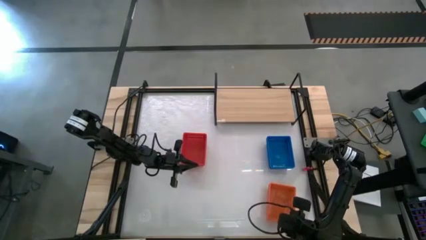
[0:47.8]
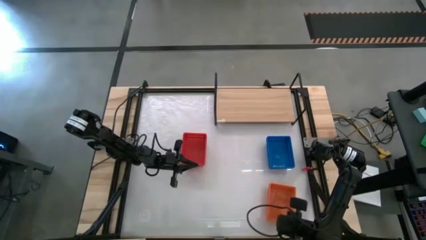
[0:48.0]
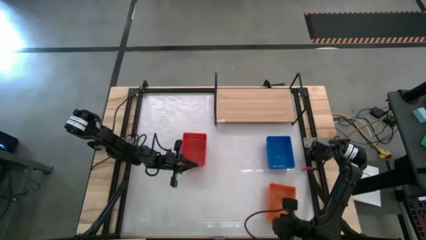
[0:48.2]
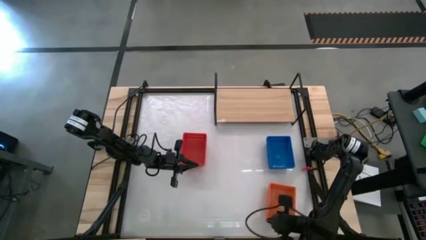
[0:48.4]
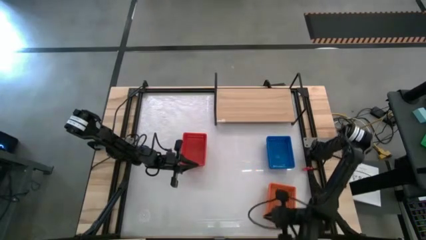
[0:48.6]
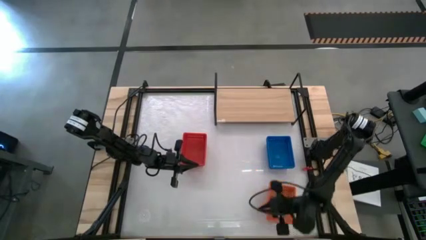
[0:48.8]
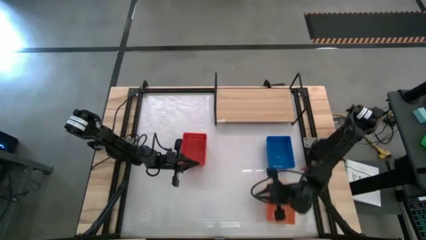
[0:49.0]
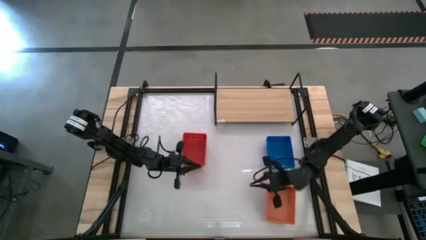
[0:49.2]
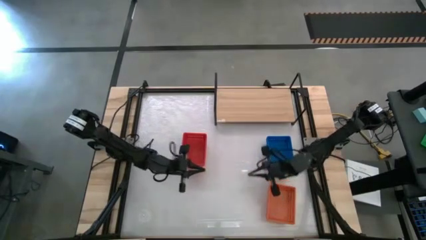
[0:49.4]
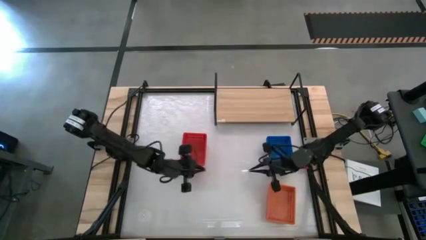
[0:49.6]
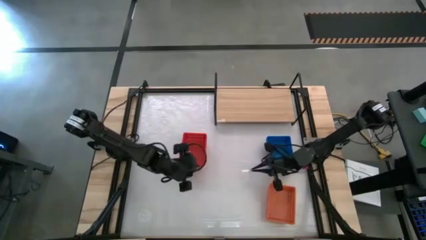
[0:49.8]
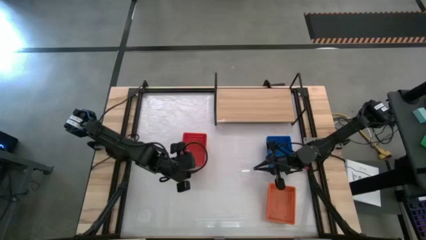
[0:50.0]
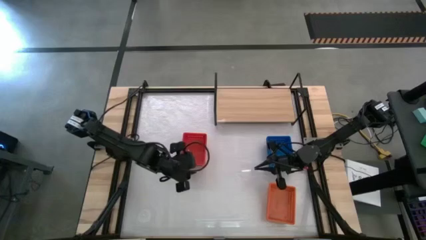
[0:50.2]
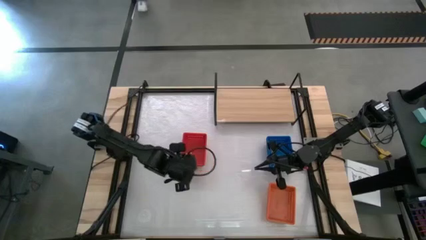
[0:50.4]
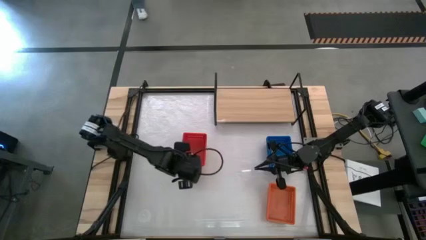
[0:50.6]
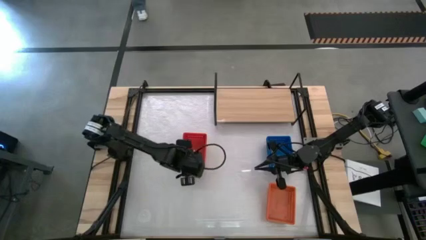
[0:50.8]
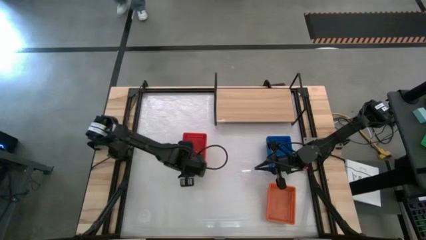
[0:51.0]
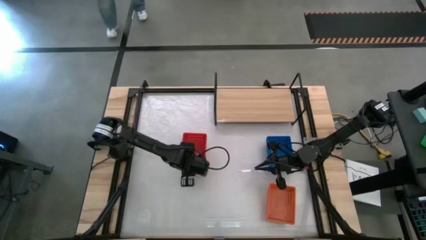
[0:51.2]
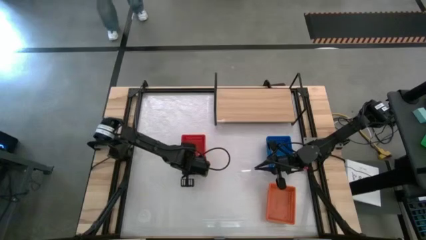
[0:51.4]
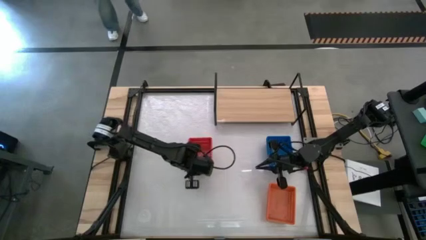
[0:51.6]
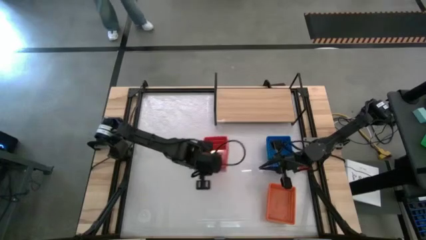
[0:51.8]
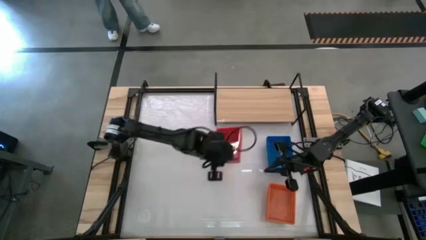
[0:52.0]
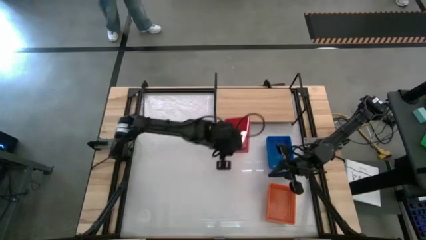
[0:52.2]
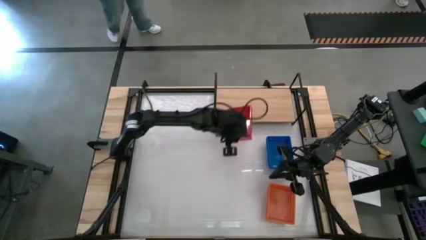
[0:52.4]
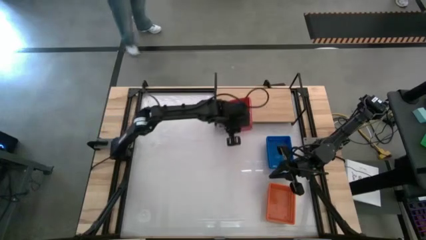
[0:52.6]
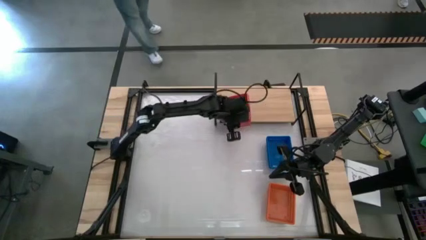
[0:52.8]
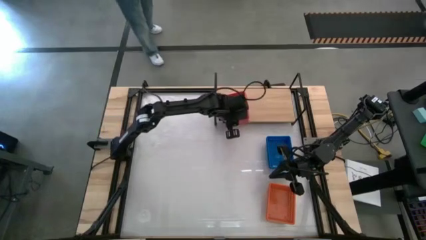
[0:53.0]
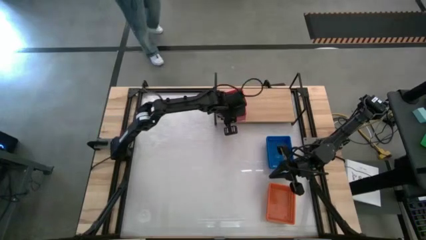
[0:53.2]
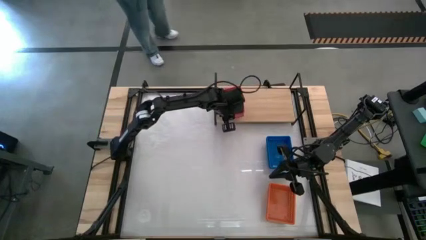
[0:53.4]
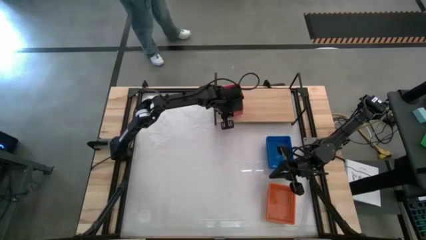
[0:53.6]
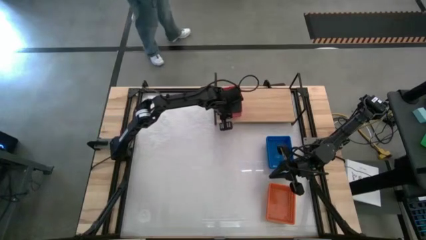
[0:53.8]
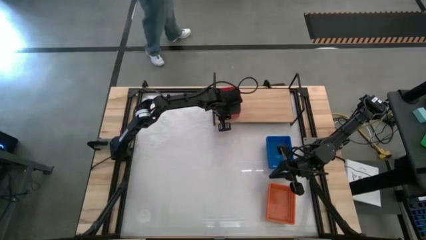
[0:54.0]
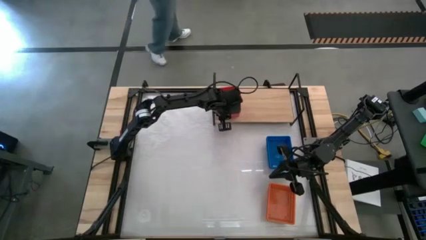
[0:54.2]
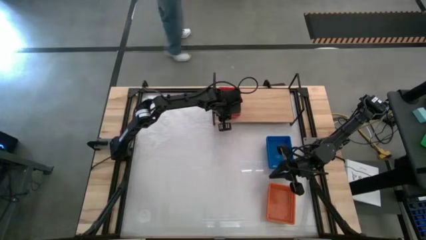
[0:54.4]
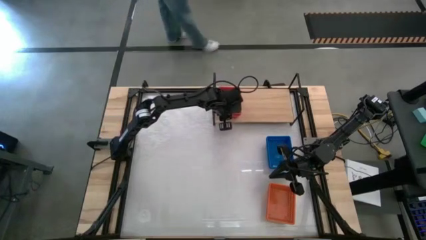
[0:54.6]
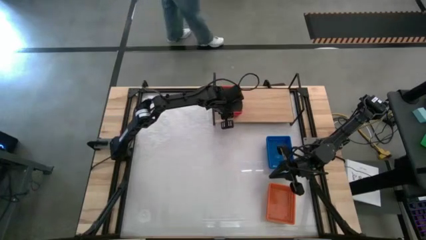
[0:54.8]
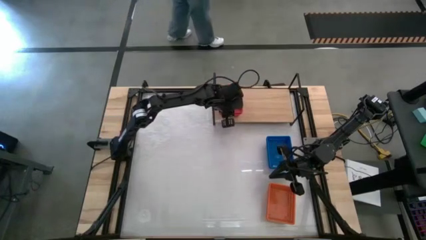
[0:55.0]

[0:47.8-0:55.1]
Task: Stack baskets on shelf by color
Put the stacked red baskets on the shelf

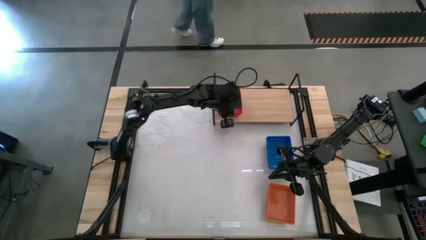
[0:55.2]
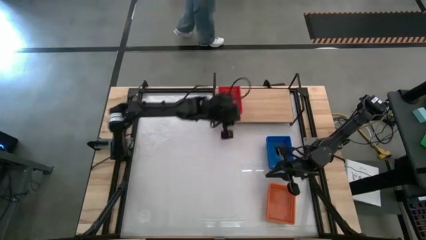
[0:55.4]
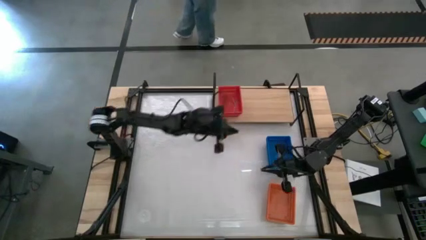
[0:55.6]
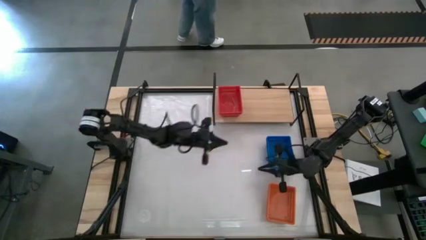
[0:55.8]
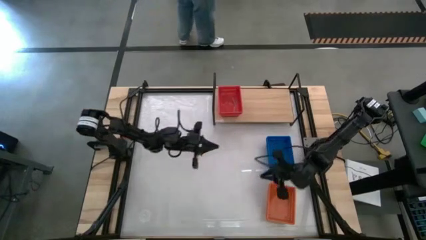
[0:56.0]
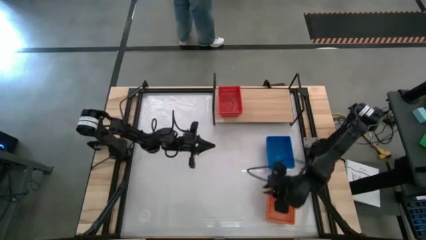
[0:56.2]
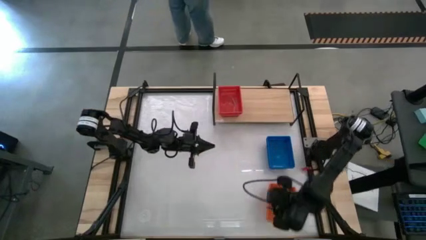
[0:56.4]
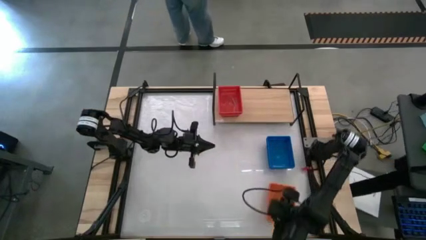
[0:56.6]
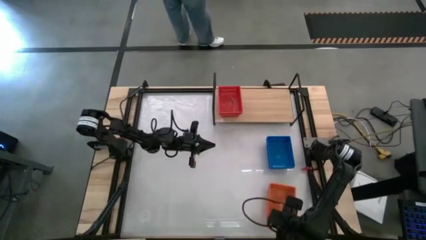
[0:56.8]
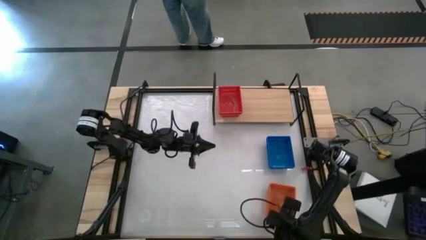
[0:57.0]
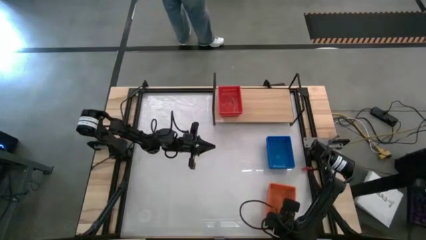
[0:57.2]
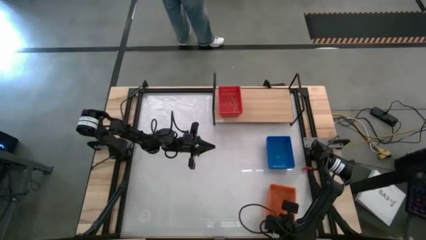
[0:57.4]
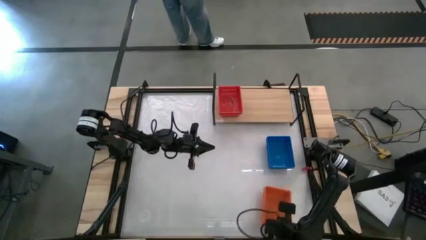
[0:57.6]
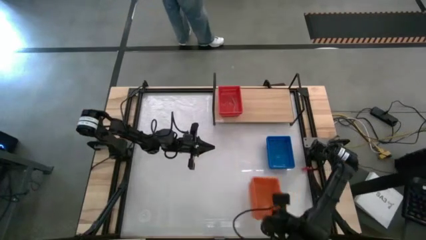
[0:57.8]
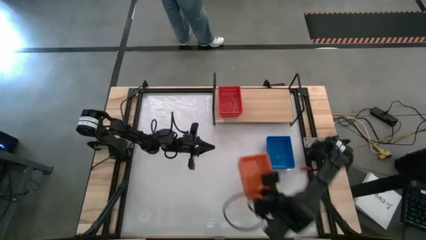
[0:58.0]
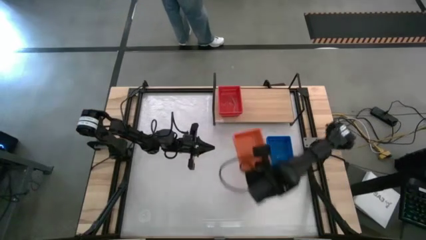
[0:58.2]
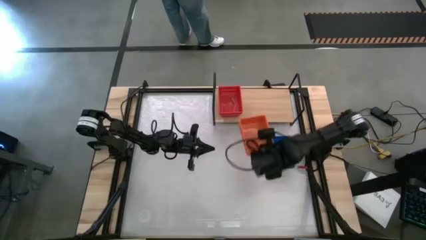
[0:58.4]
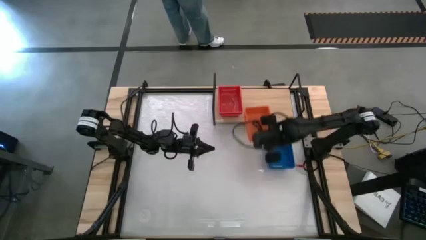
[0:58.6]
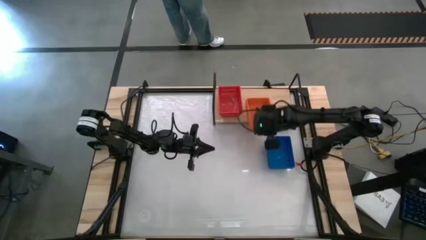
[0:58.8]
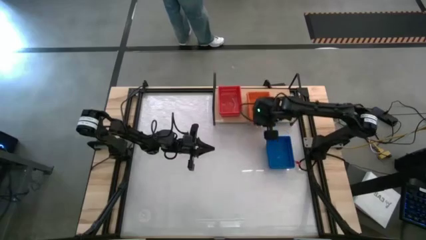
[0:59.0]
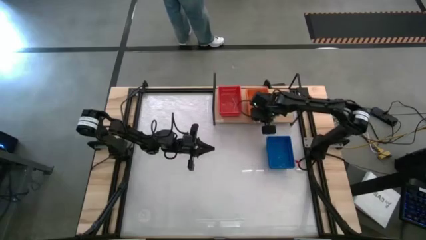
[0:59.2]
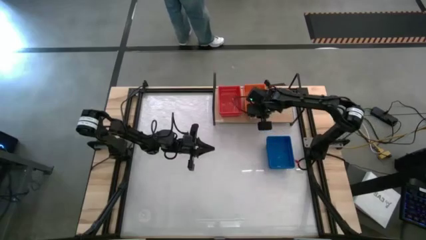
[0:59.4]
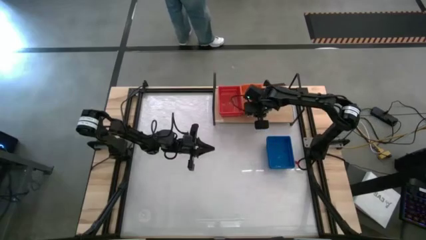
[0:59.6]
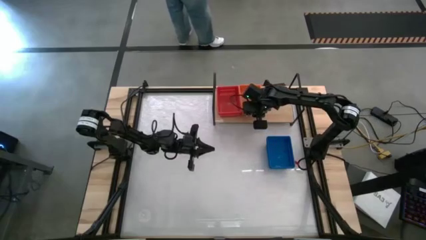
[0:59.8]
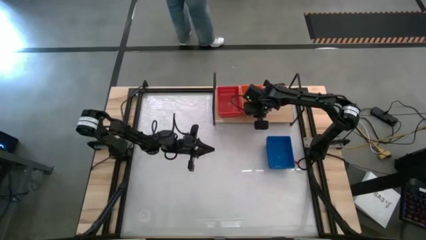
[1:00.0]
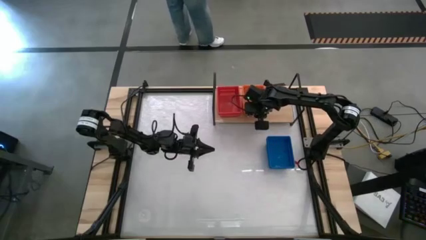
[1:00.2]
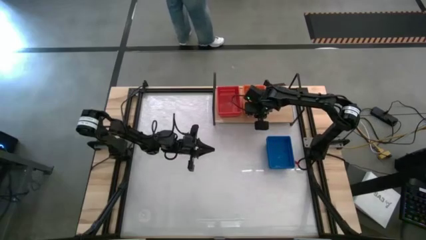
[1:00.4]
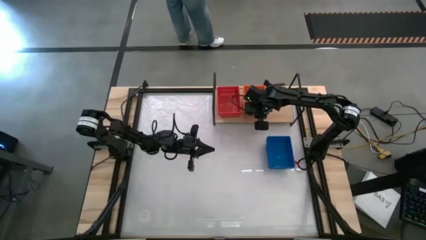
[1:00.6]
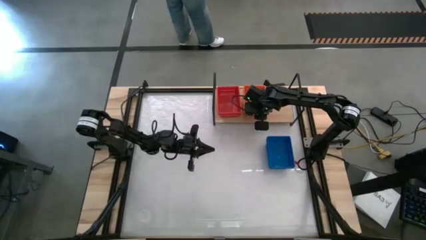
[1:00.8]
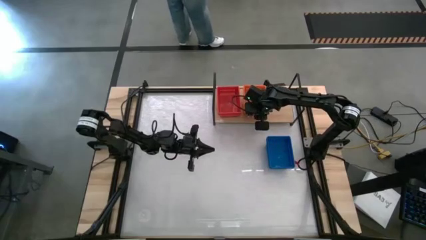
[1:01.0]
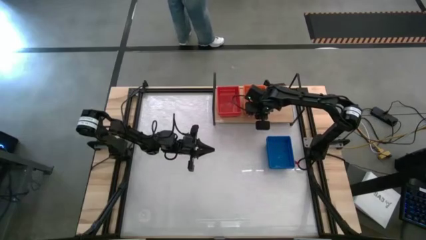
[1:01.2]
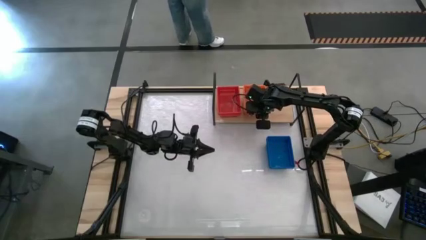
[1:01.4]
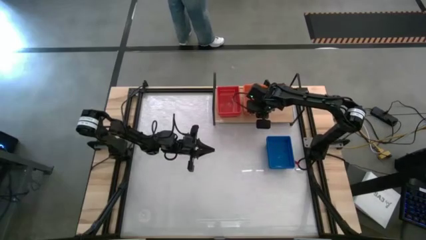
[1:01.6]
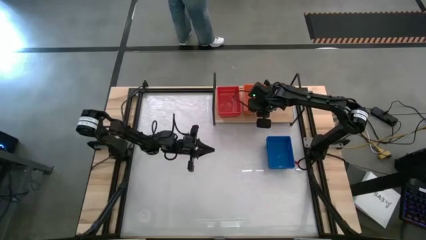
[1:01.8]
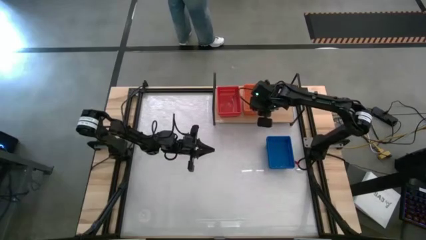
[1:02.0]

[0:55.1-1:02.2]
Put the stacked orange baskets on the shelf

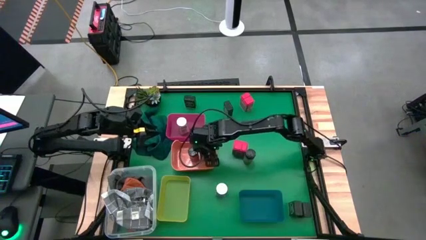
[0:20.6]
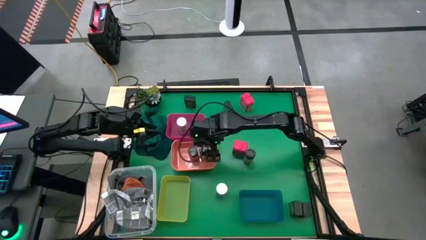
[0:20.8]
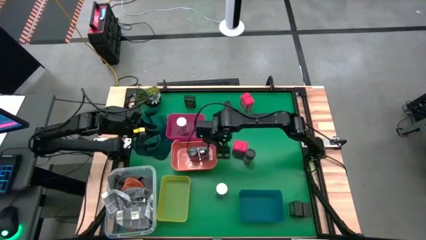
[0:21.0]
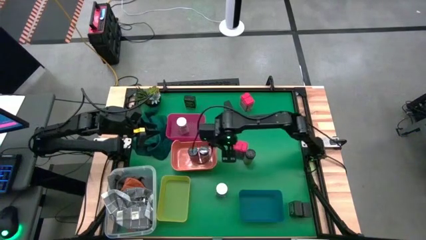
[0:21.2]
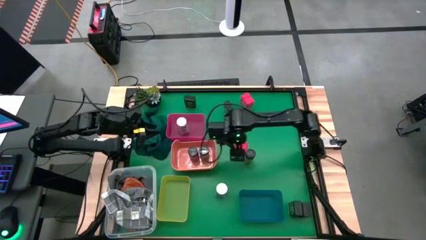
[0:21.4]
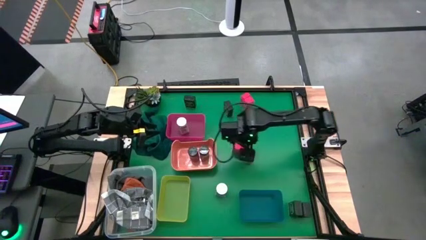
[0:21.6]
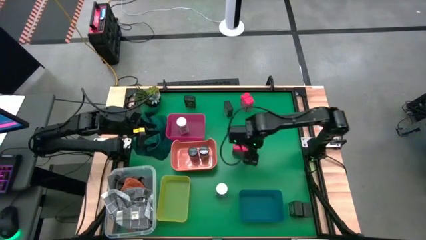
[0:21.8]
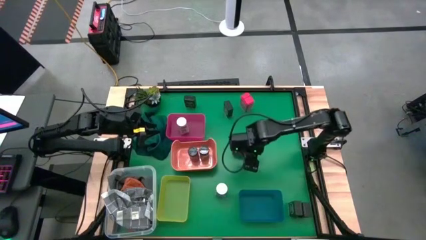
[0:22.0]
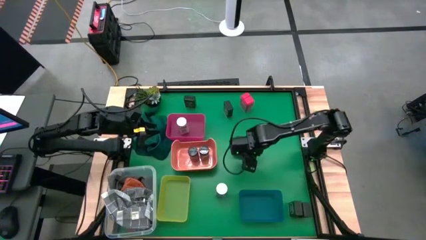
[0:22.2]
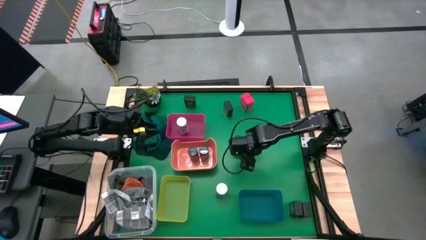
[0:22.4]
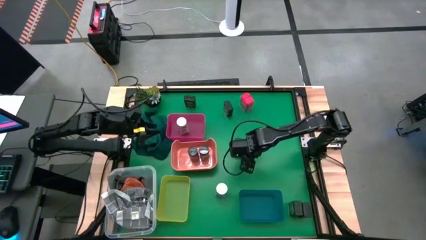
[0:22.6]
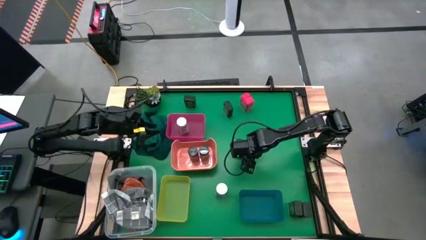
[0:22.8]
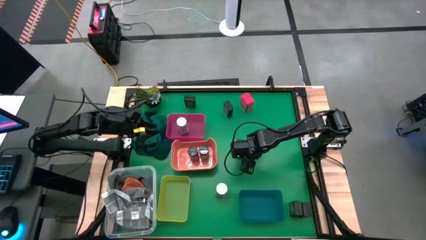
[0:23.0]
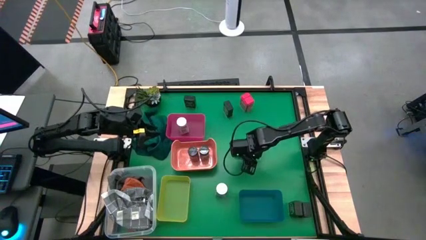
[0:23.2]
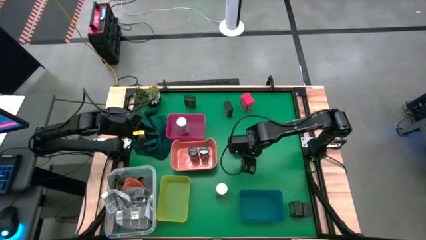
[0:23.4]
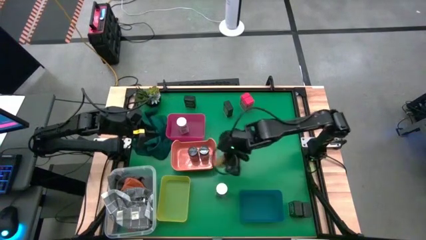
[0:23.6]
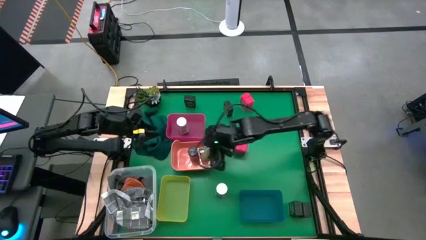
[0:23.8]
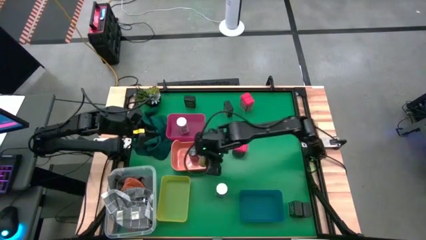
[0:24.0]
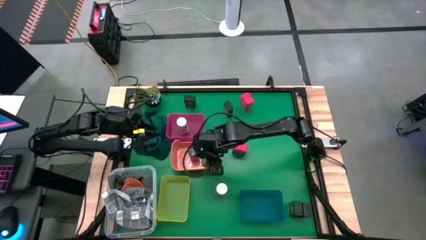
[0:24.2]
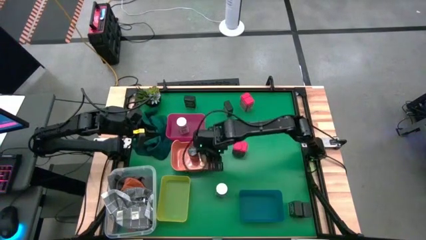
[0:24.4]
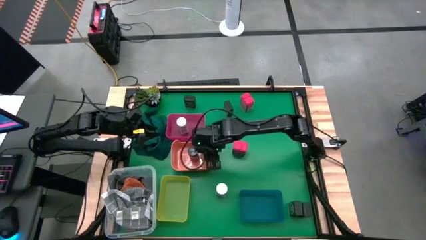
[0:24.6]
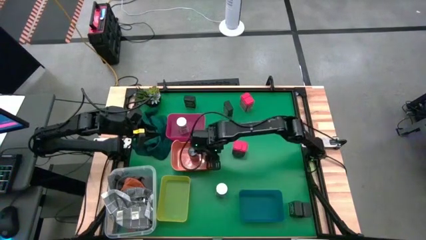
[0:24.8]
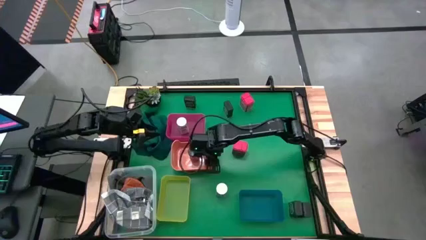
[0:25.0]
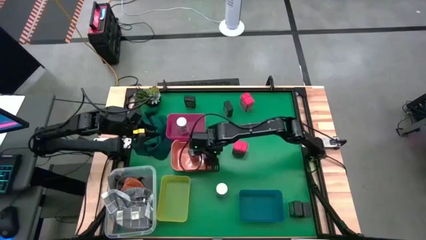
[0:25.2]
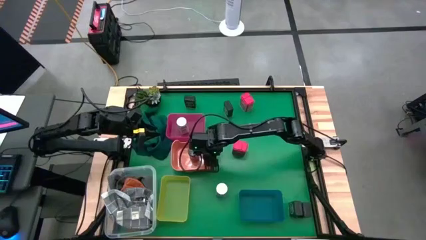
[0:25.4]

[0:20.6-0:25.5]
Task: Sort spices by type
Put the black seasoning bottle into the orange bin
